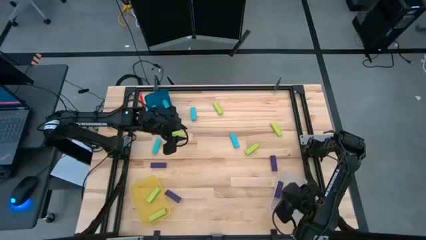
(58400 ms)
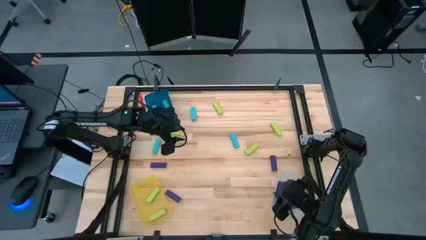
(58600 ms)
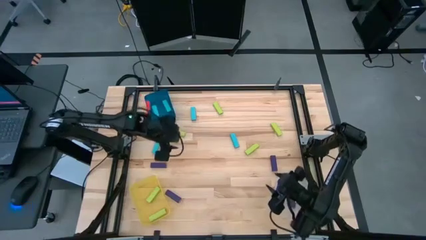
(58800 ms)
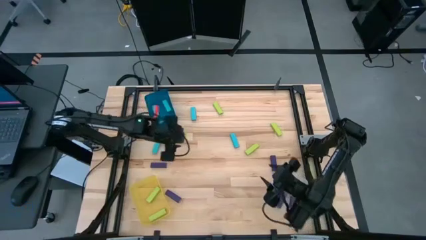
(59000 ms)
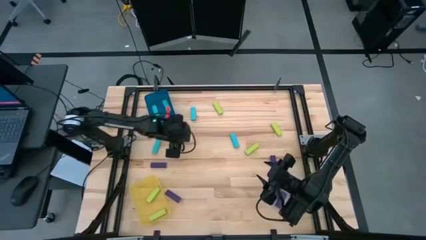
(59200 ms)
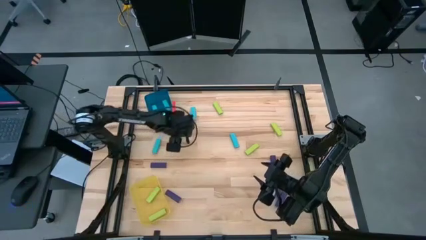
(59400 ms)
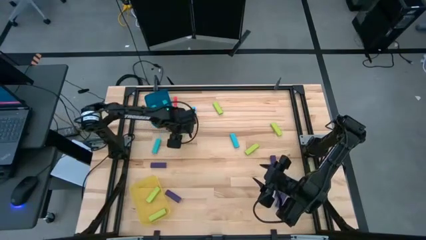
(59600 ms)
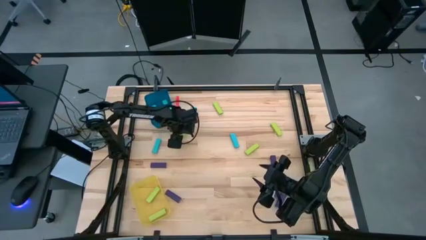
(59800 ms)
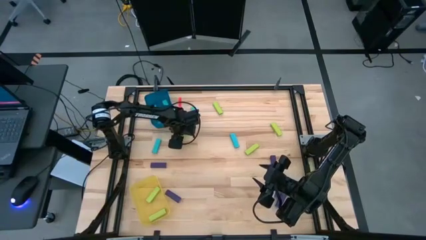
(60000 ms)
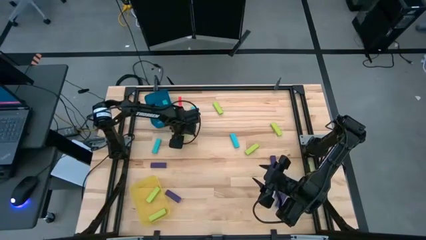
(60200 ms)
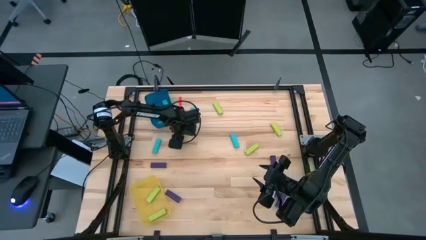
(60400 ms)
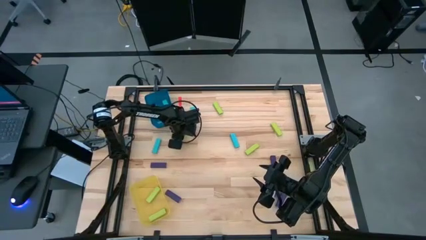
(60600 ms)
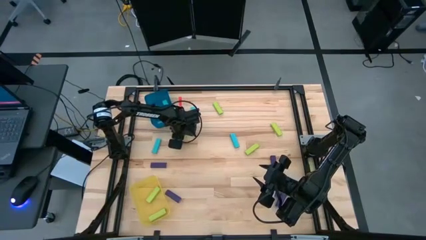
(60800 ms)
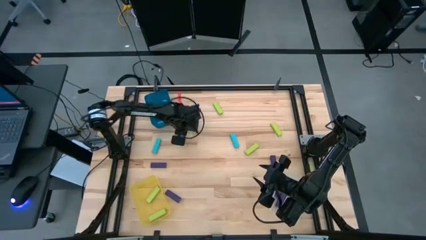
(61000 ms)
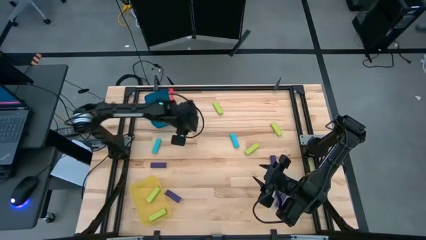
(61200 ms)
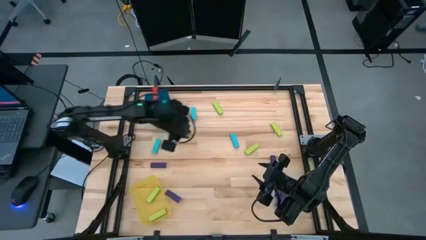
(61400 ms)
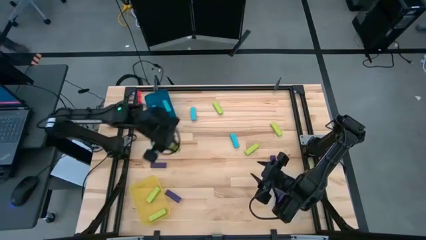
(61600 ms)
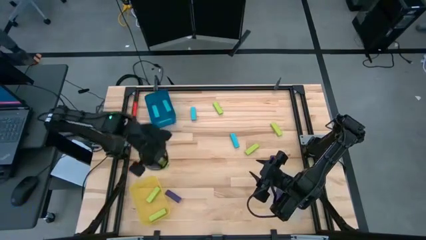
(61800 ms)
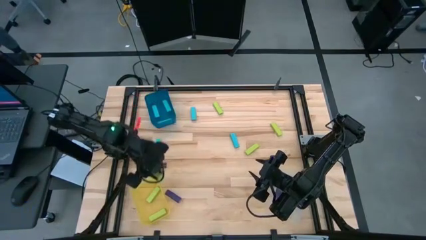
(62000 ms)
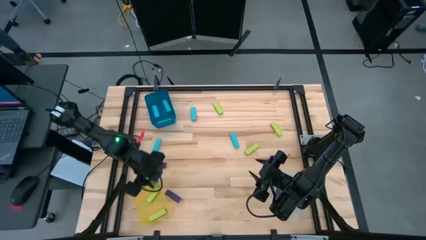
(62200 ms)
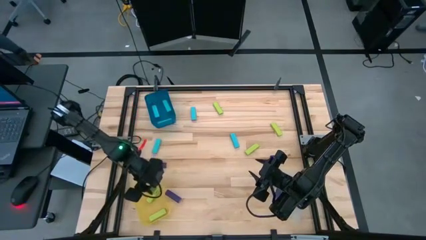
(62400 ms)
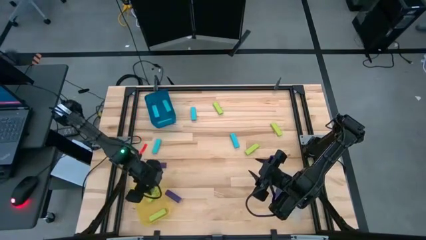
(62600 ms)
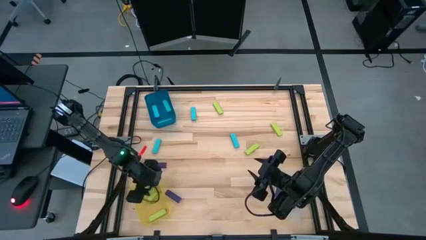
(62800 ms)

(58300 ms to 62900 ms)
Task: Sort blocks
Put the green block into the yellow bin

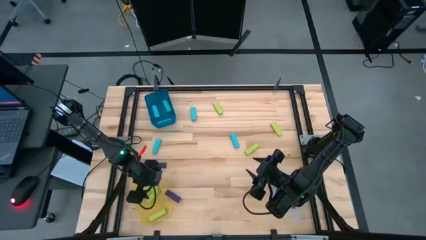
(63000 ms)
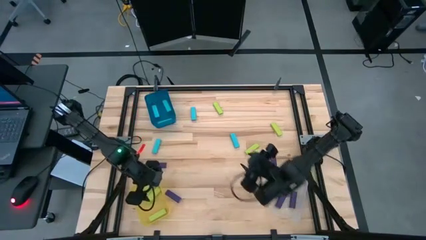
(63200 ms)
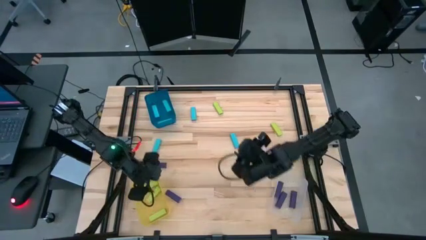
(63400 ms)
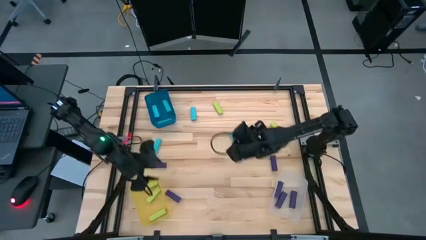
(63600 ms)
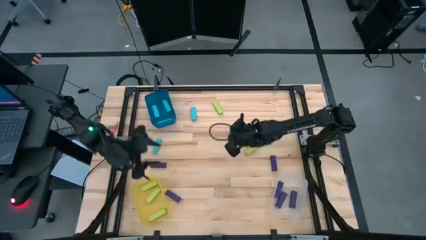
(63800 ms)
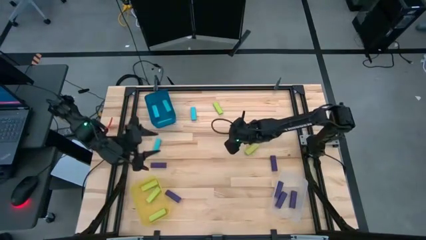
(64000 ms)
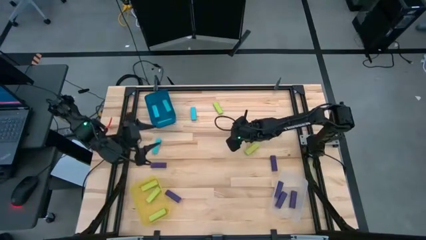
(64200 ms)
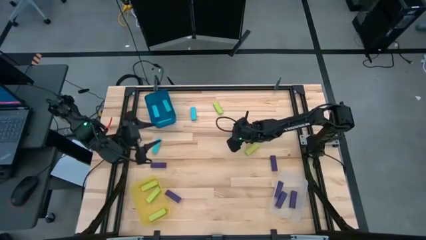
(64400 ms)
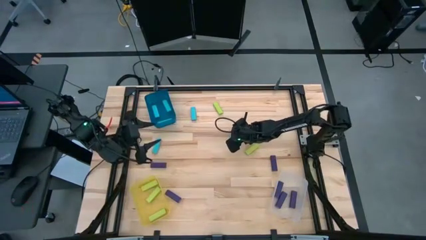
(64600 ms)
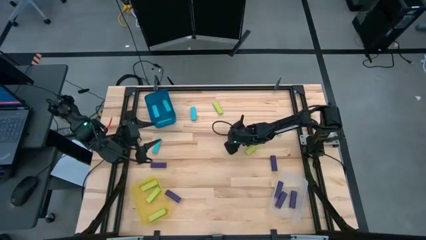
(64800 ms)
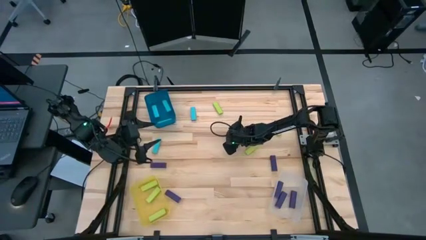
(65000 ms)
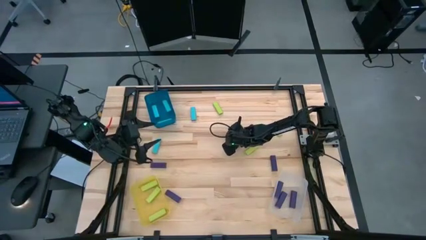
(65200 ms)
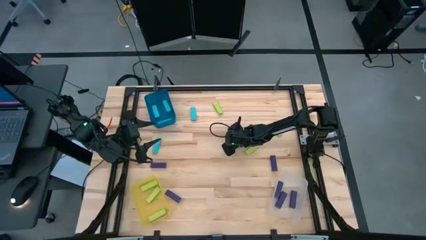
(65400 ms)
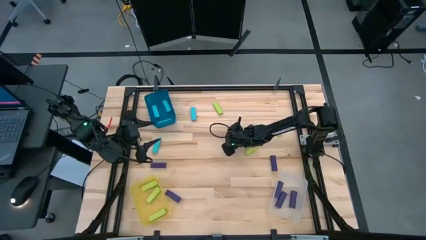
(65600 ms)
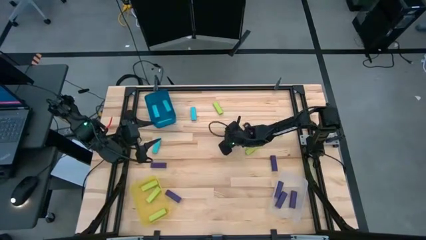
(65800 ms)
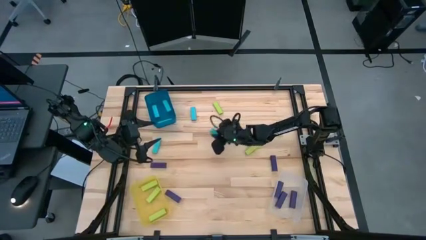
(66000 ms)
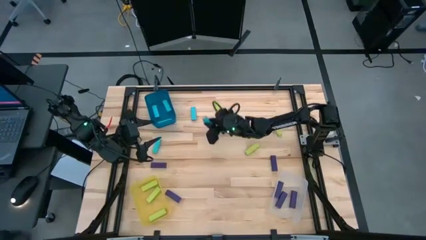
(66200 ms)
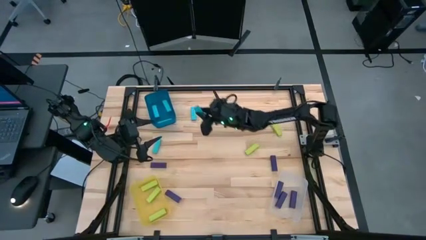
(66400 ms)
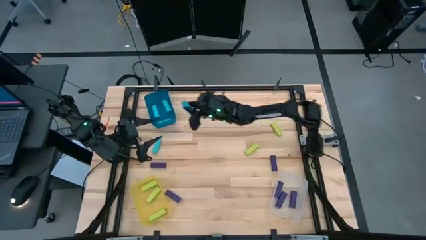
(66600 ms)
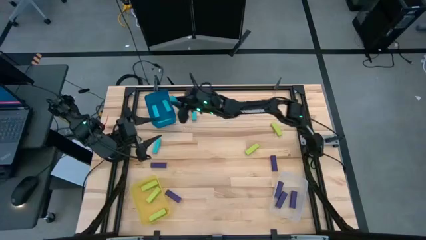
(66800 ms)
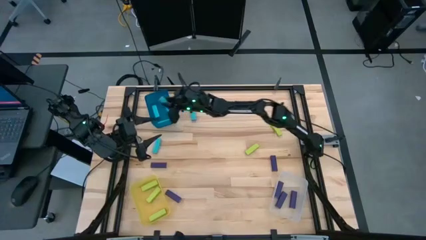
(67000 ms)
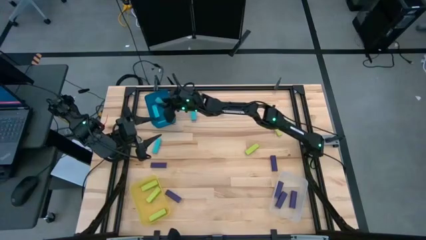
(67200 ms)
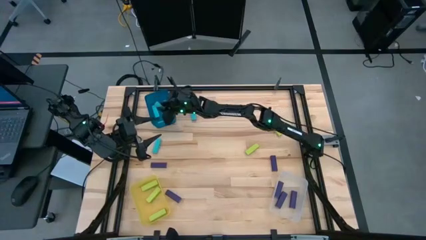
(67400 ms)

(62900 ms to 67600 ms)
Put the blue block into the blue bin

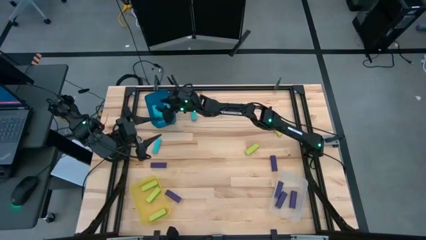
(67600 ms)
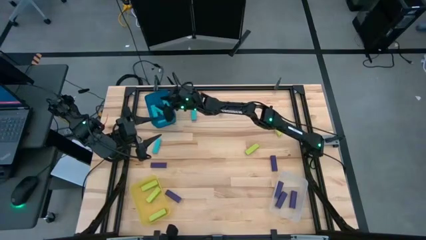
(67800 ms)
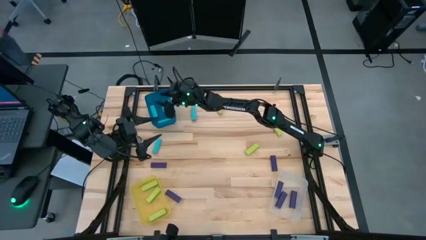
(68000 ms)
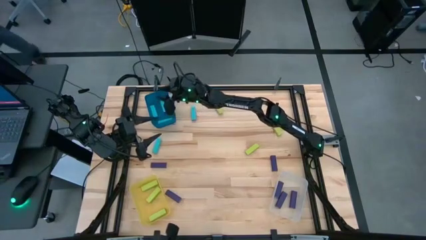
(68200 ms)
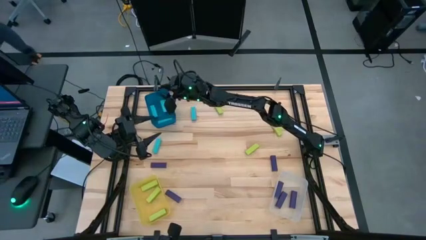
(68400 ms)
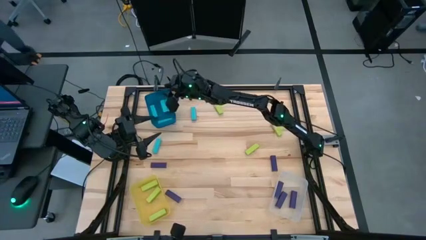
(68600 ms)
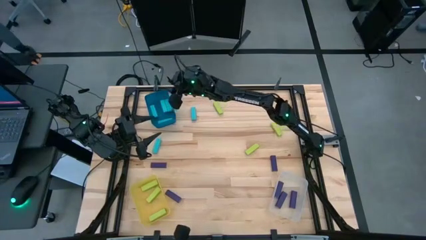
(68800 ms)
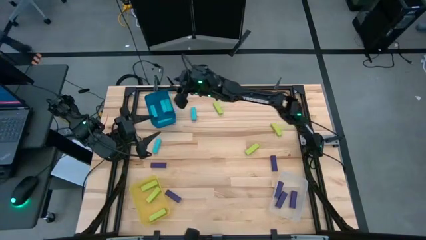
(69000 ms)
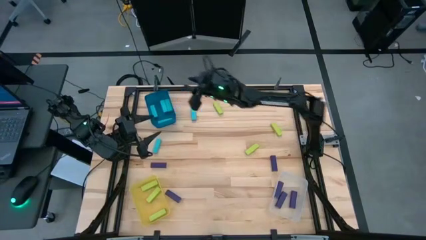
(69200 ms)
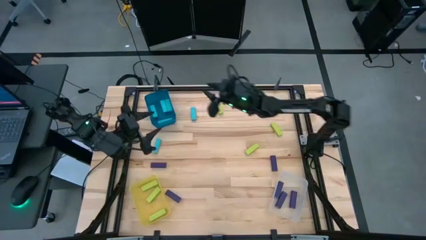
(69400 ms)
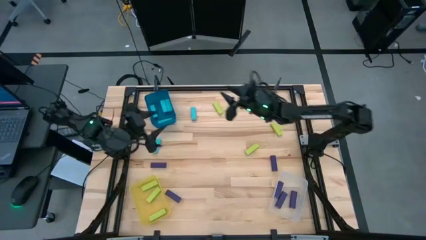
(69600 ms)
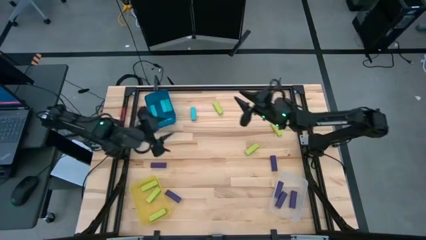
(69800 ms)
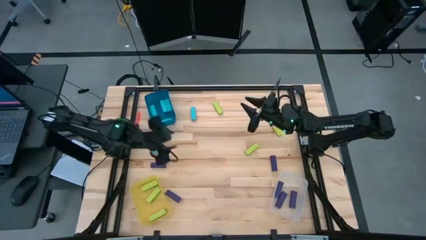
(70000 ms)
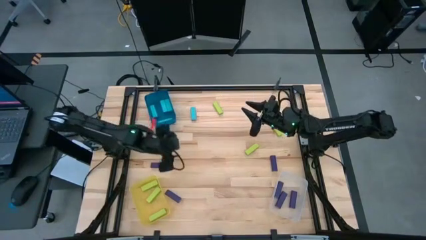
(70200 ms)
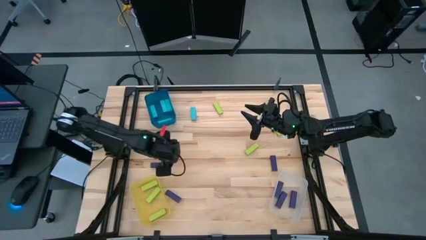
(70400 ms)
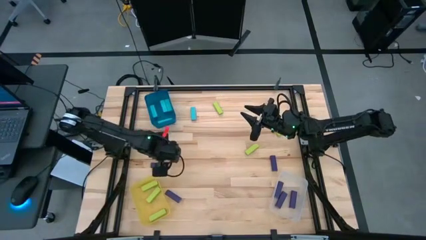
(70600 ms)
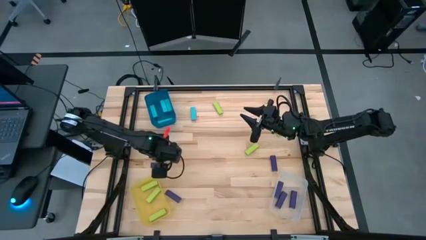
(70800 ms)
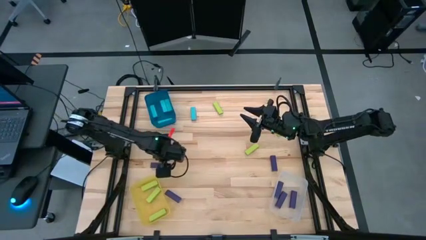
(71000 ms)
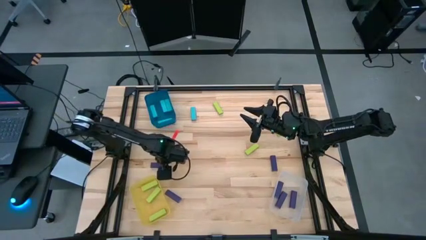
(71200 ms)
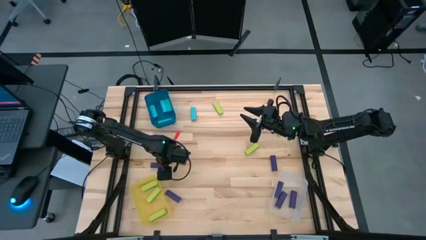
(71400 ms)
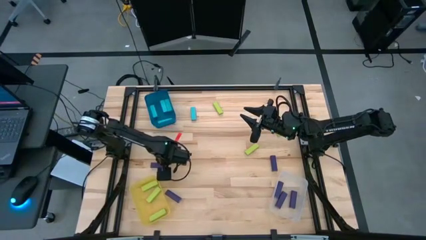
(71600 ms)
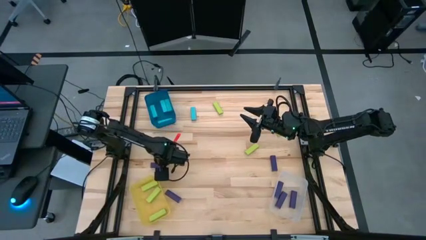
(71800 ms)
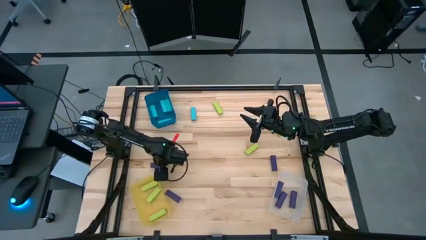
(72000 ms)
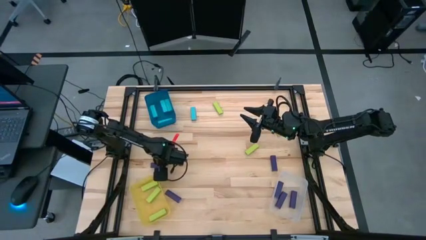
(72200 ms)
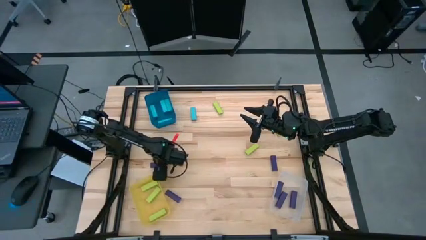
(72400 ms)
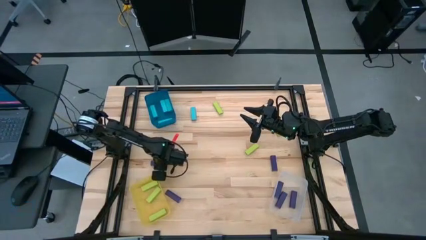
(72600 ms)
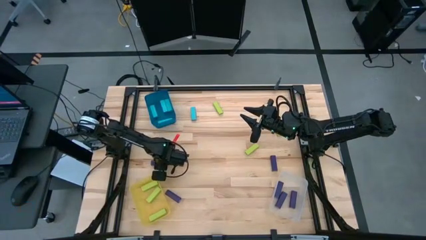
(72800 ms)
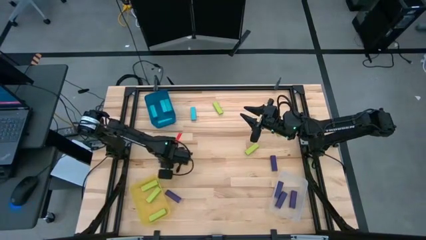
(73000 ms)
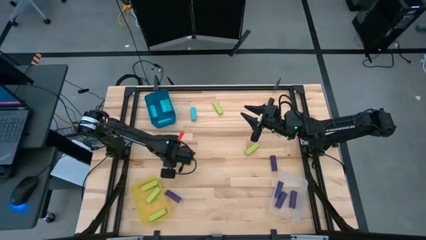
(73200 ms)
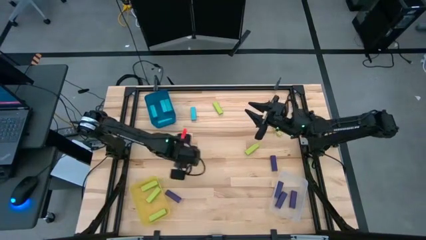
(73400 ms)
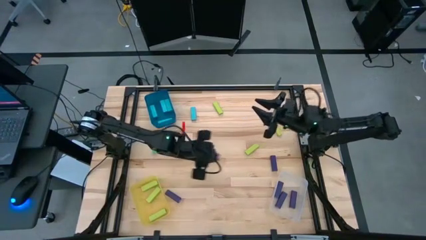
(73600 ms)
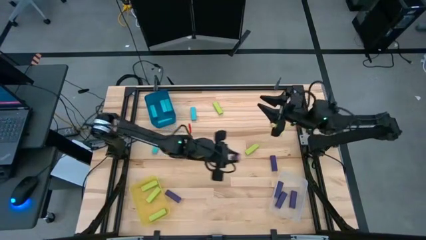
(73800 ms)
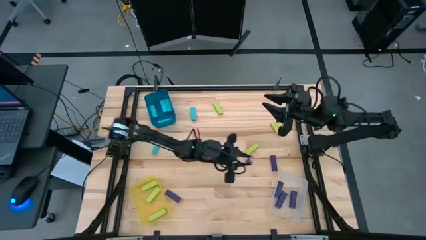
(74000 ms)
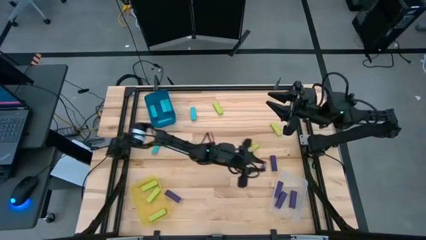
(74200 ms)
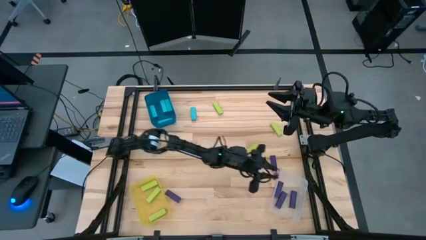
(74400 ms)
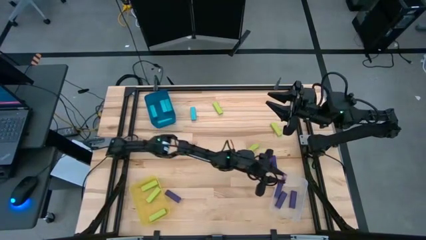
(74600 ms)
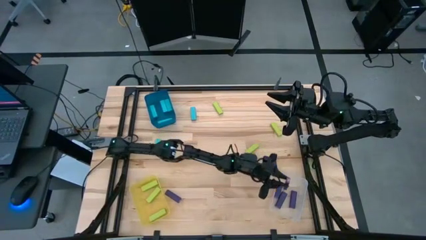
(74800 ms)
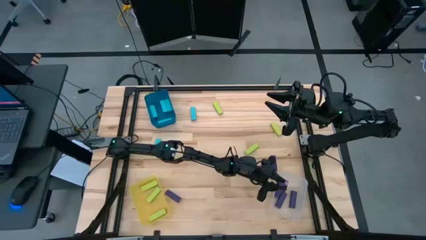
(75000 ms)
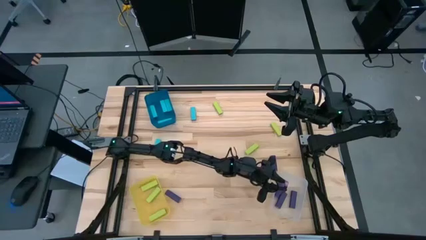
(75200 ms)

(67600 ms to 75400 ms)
Put the purple block into the transparent bin
